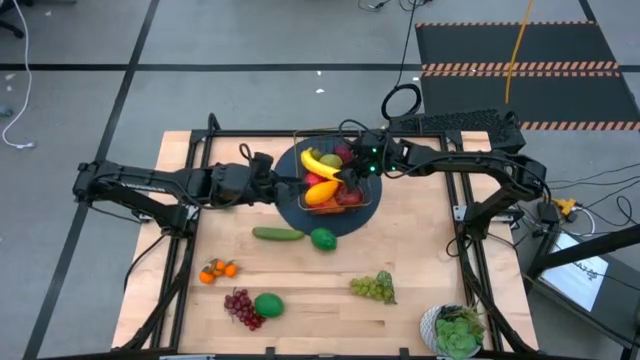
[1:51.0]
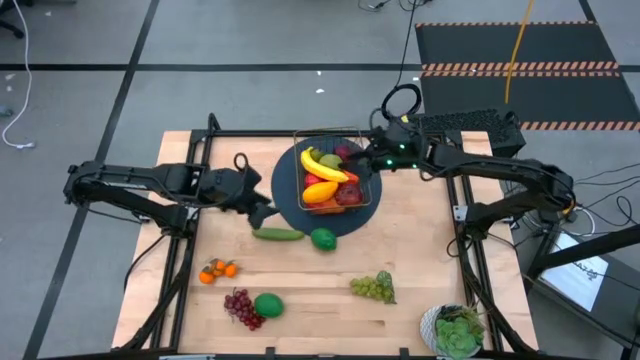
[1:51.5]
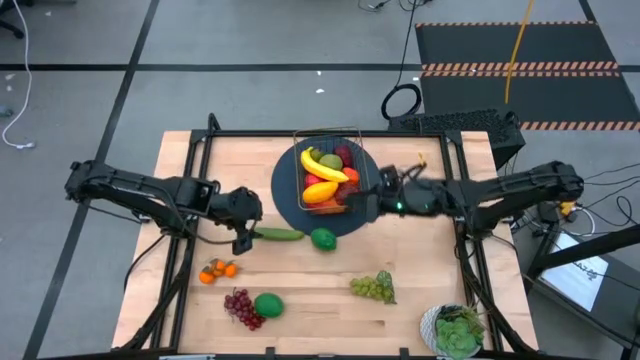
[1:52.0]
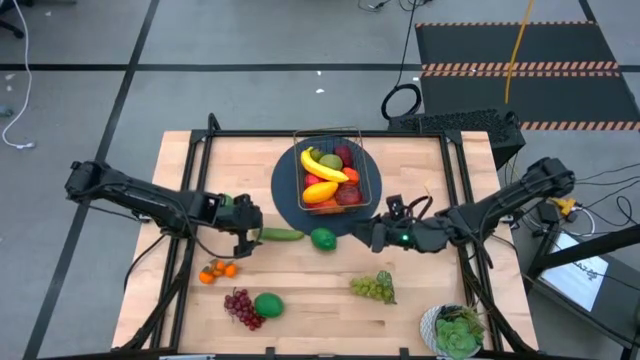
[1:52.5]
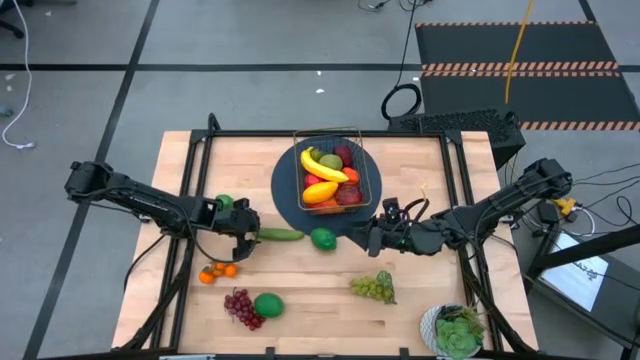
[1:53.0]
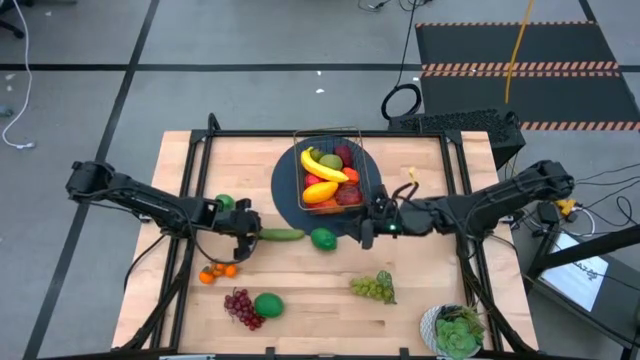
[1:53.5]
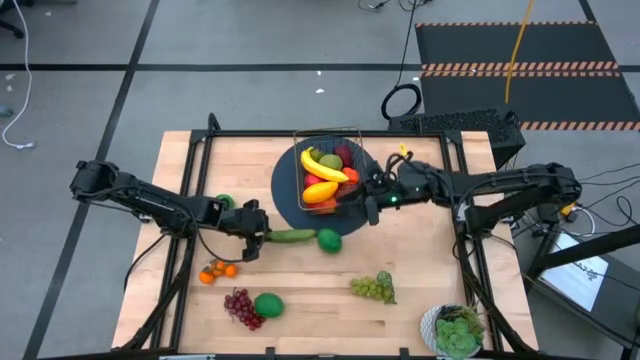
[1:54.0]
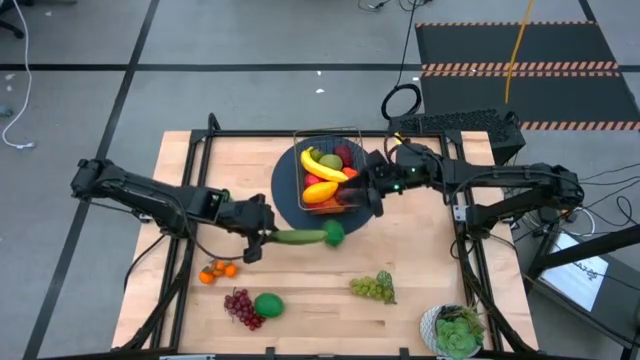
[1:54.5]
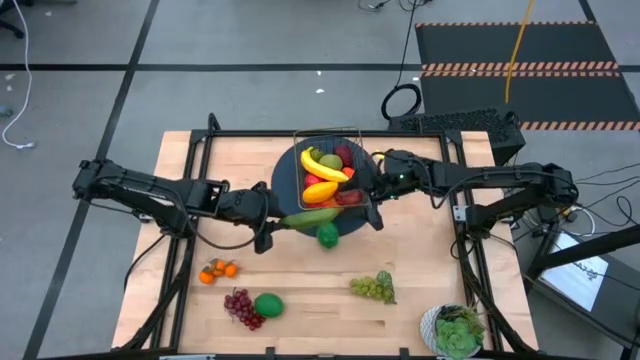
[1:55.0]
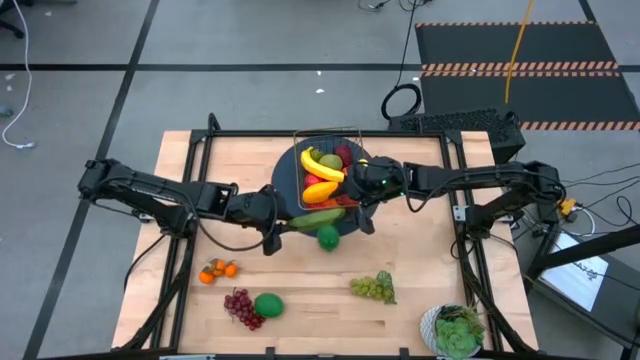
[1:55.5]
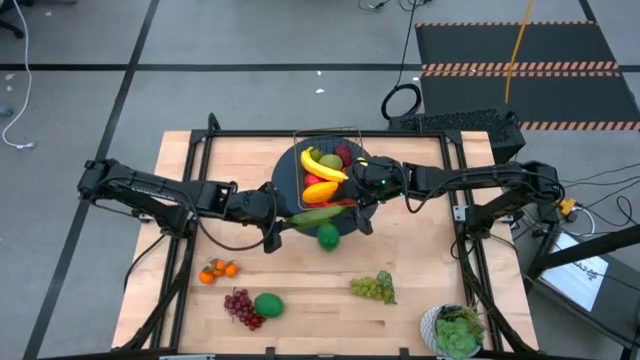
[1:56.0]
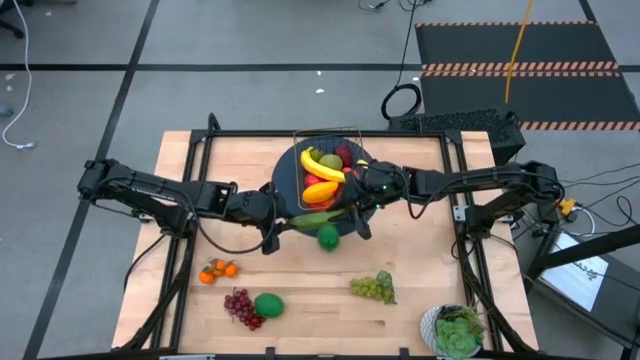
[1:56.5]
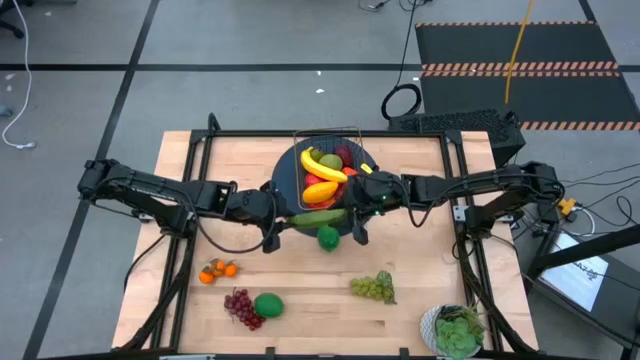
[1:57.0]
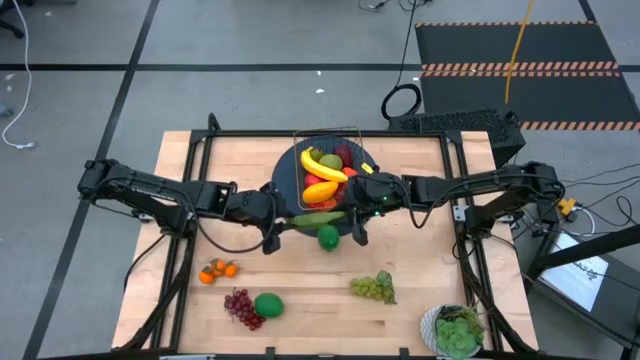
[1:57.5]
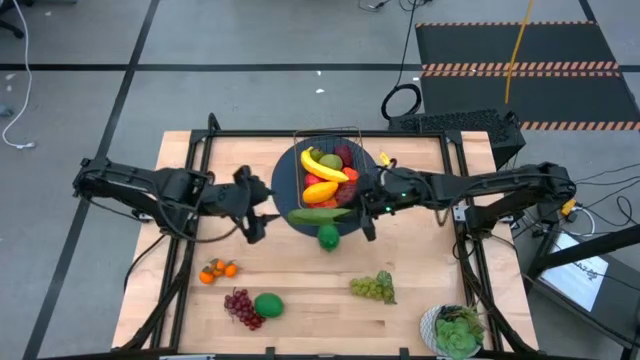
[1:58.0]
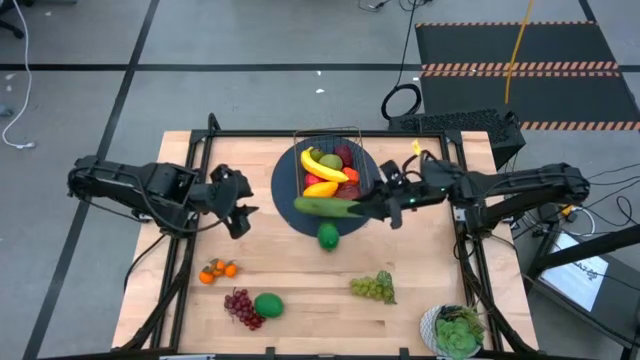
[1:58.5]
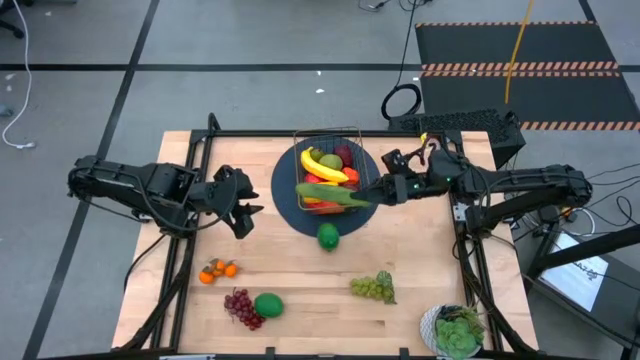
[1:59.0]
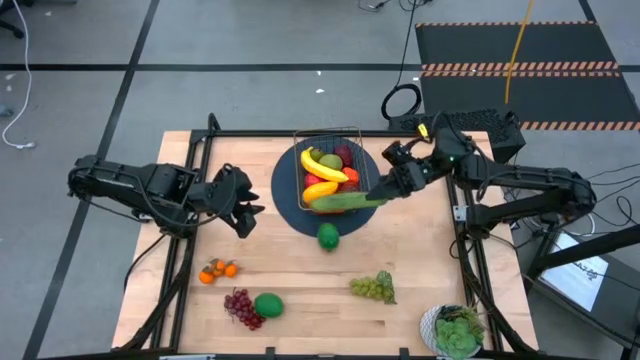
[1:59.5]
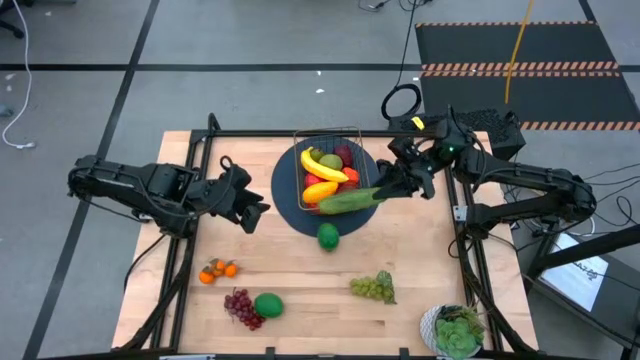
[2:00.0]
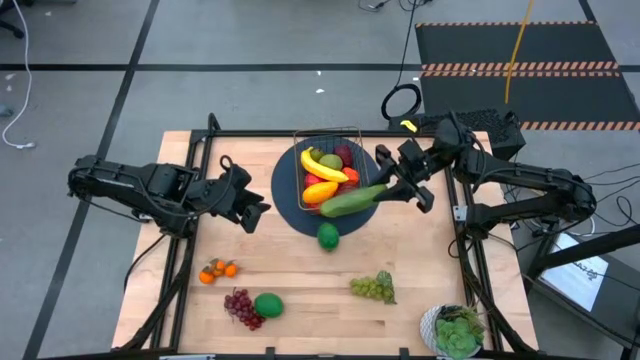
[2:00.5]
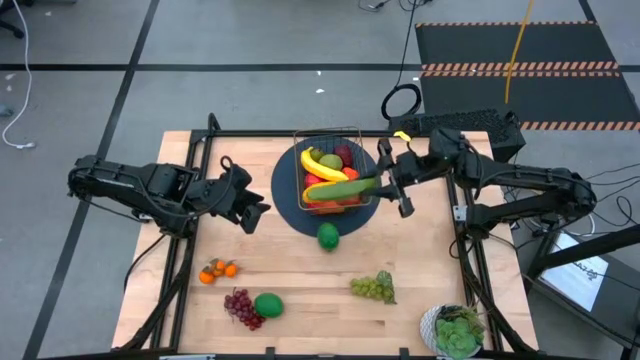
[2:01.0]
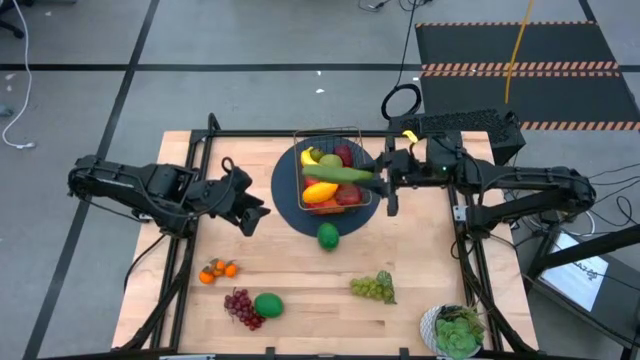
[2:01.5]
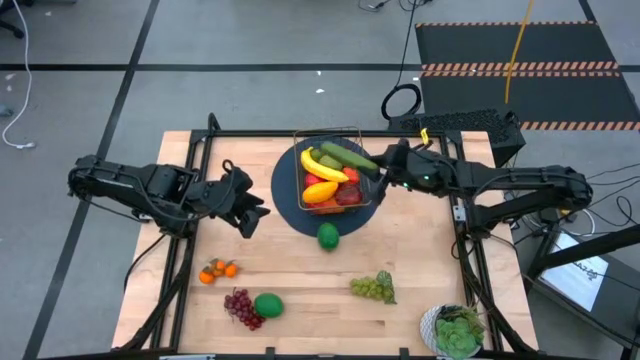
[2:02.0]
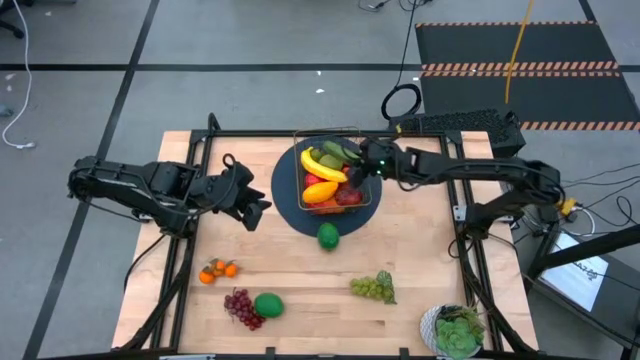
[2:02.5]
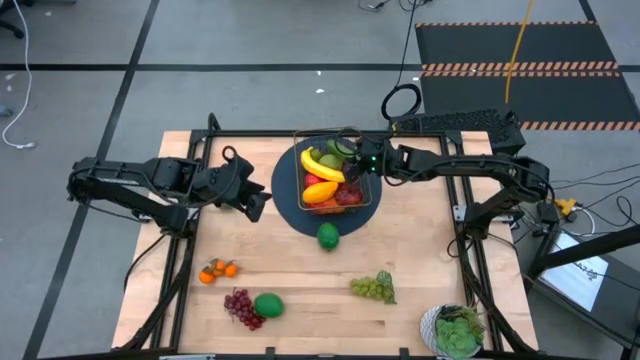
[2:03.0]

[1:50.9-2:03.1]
Task: Build produce basket
Put the green cucumber into the gold wire basket

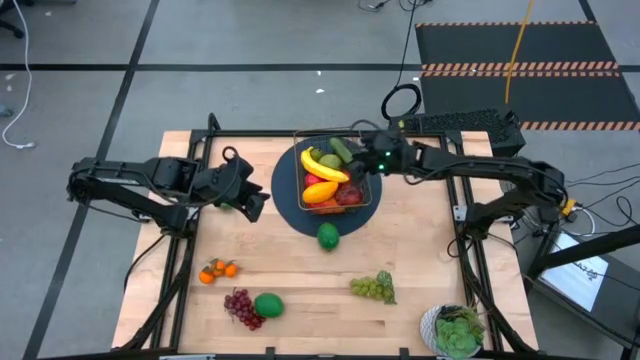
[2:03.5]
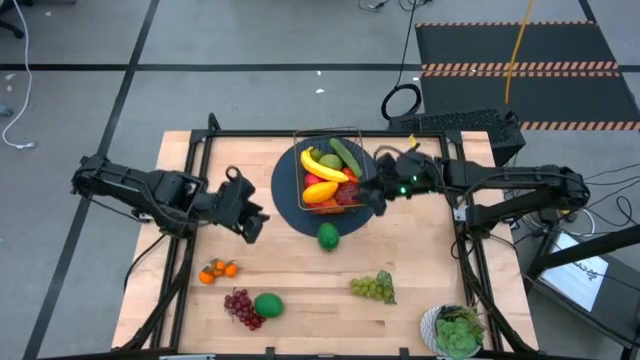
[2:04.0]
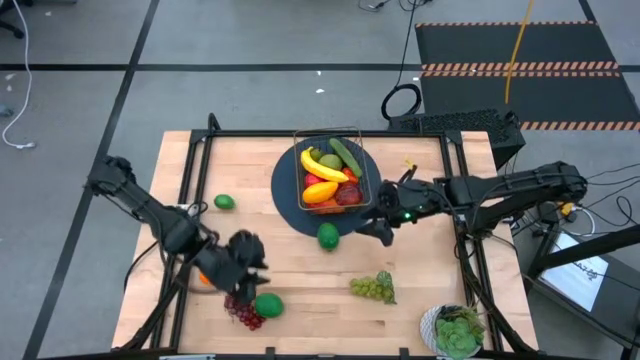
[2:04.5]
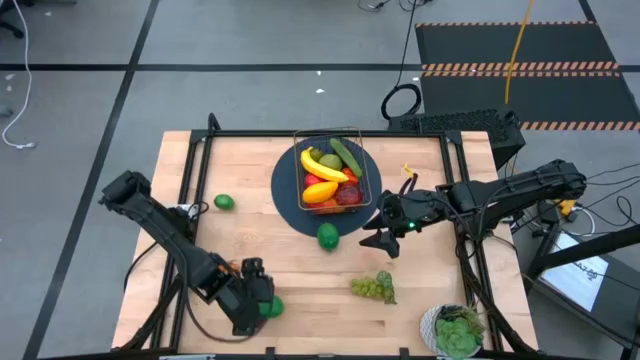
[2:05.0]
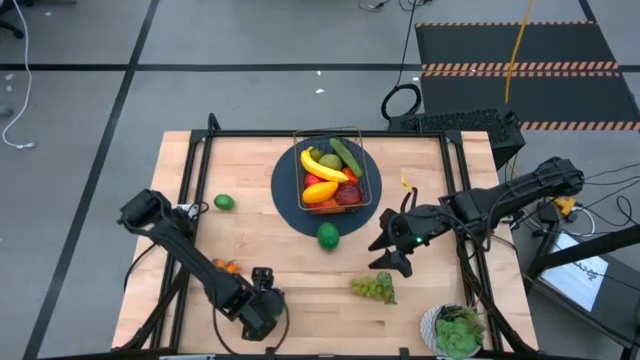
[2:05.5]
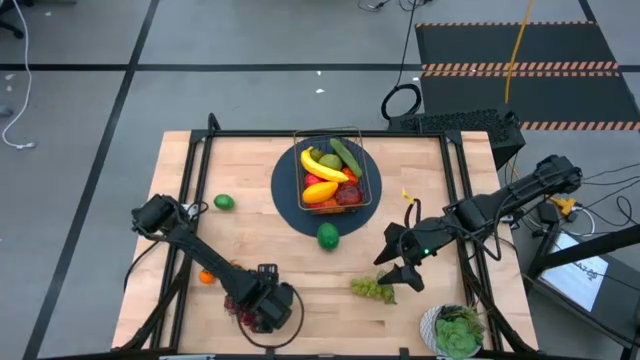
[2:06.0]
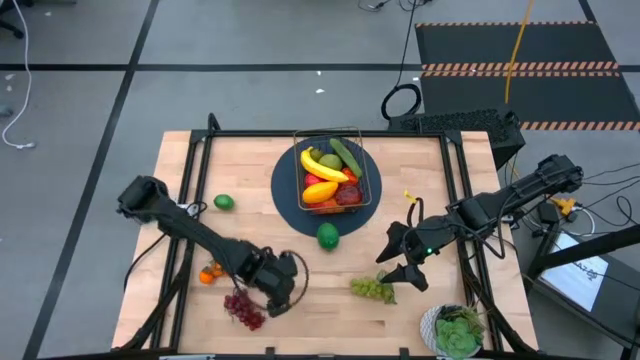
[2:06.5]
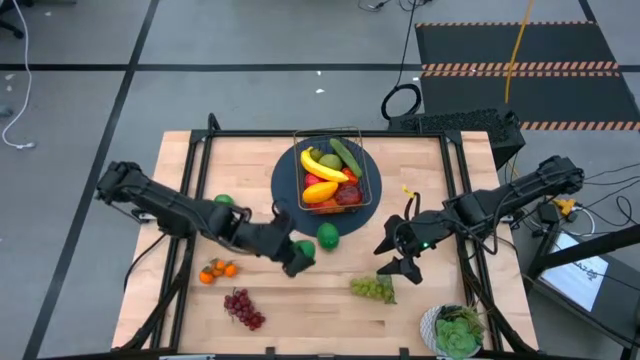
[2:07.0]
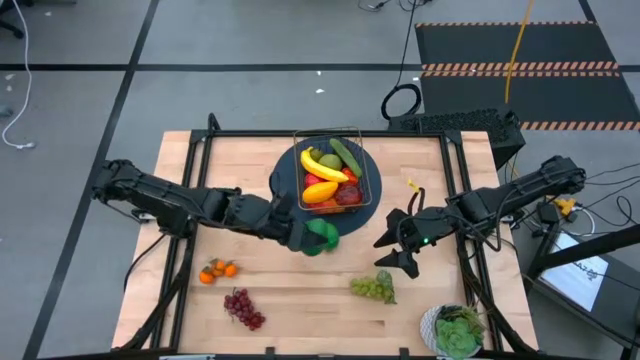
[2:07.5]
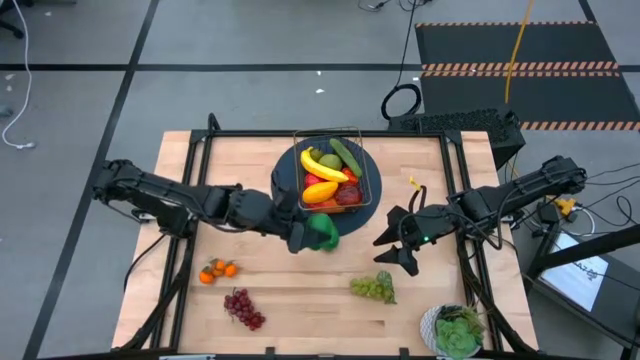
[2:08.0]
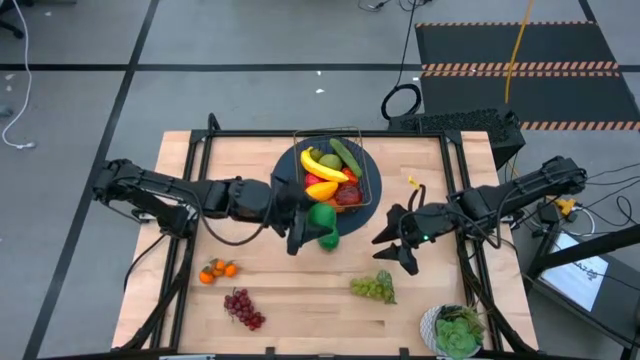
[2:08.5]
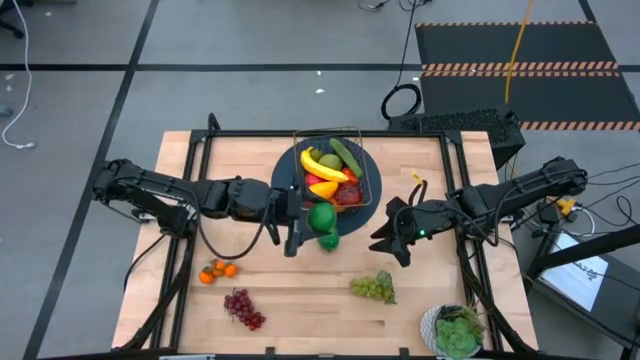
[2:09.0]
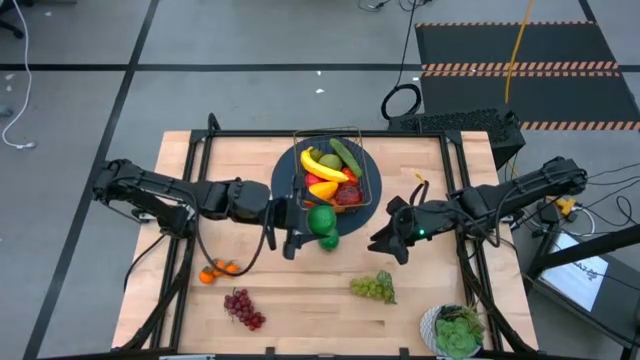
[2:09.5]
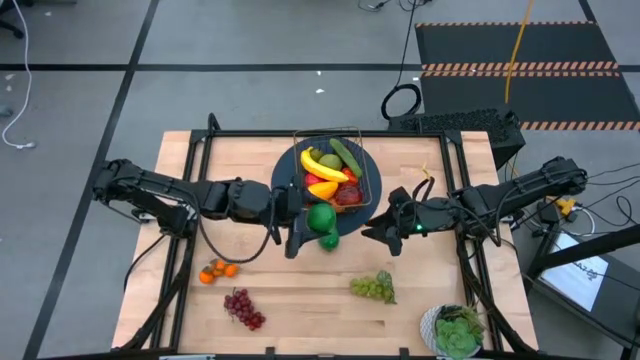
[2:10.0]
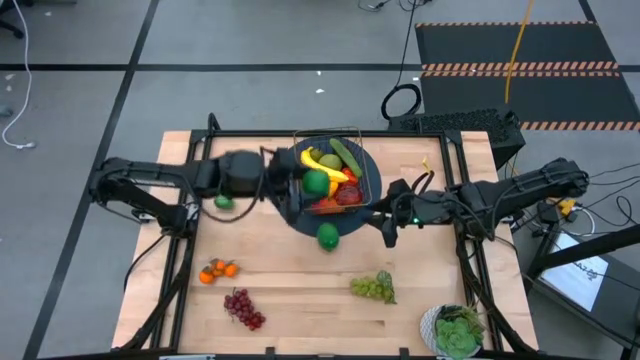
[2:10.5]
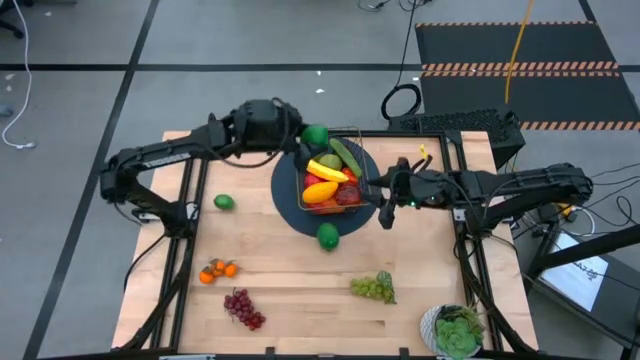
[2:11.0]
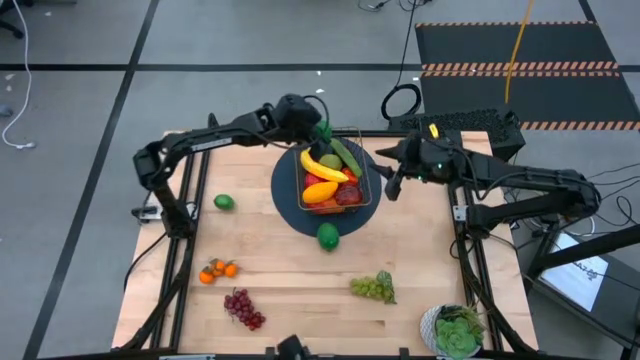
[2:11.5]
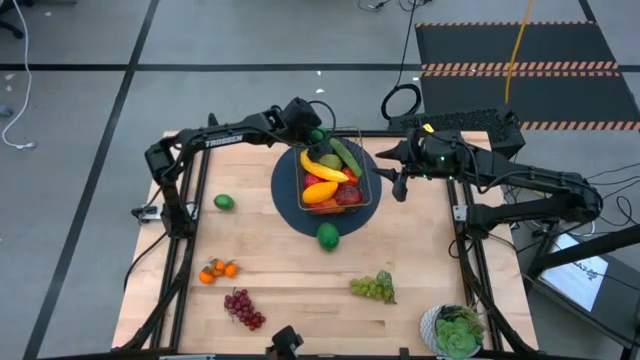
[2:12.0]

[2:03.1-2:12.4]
Put the bottom green lime into the gold wire basket
